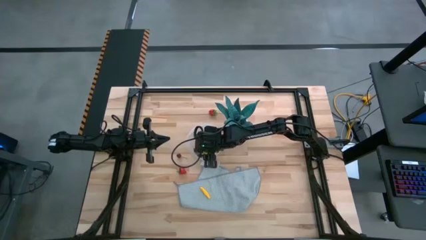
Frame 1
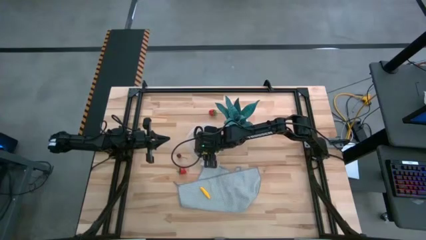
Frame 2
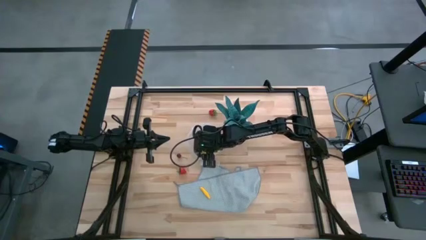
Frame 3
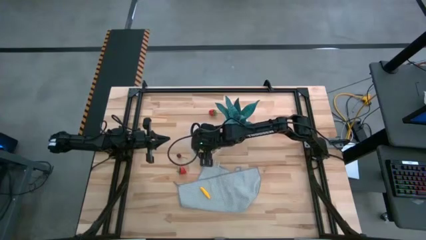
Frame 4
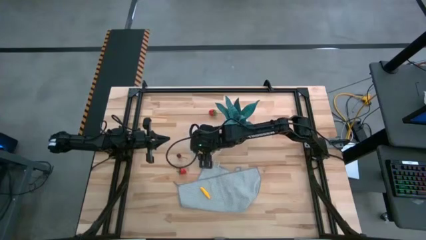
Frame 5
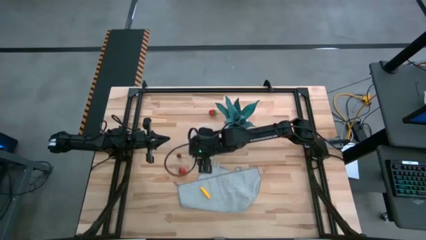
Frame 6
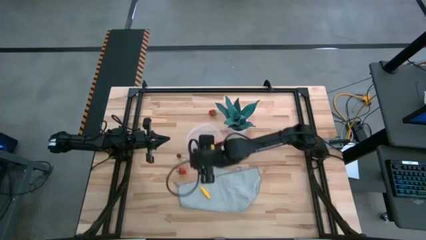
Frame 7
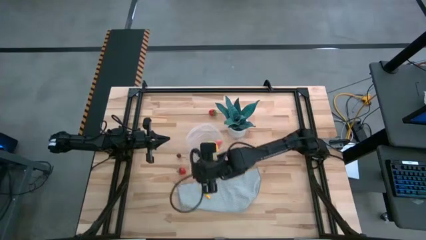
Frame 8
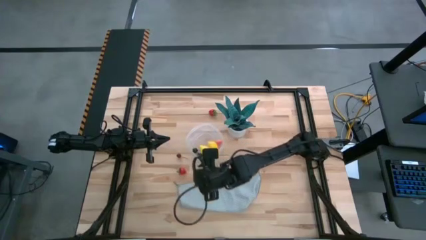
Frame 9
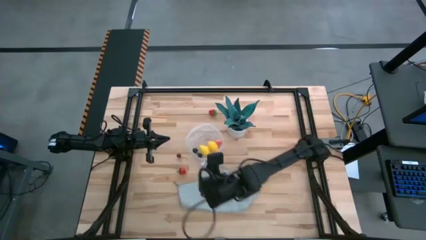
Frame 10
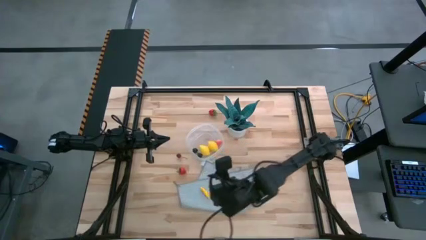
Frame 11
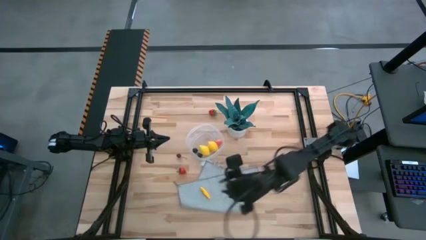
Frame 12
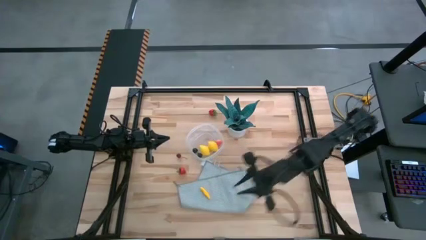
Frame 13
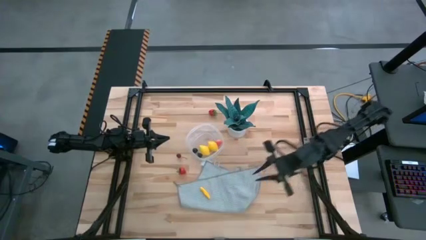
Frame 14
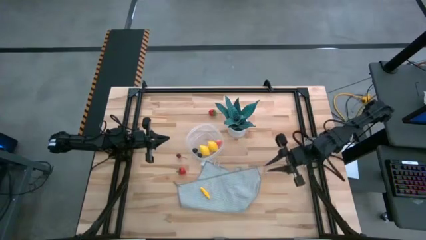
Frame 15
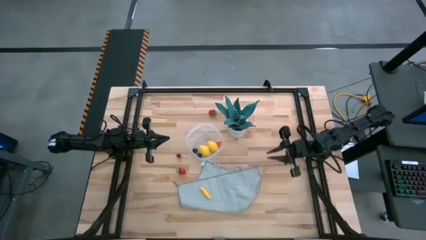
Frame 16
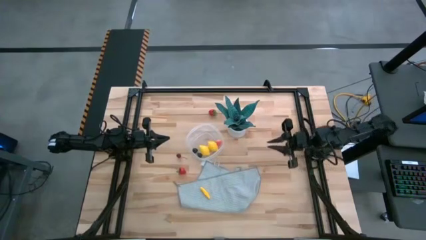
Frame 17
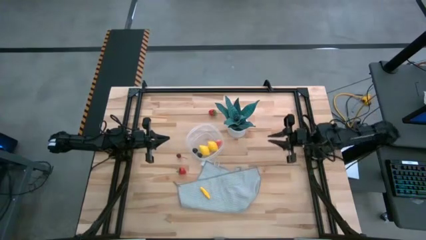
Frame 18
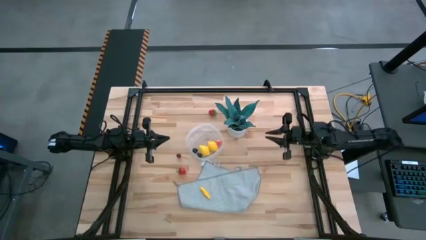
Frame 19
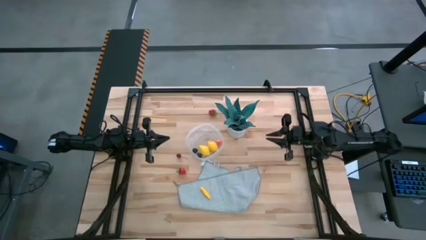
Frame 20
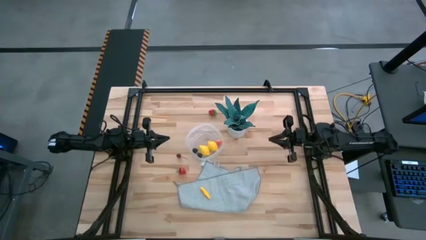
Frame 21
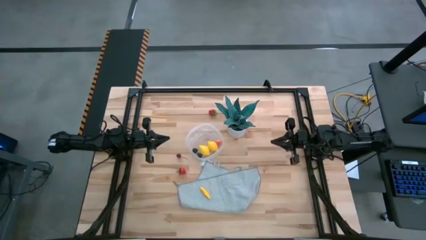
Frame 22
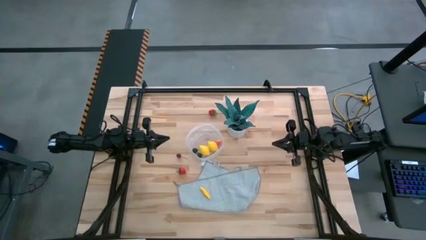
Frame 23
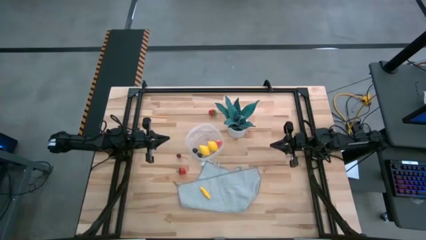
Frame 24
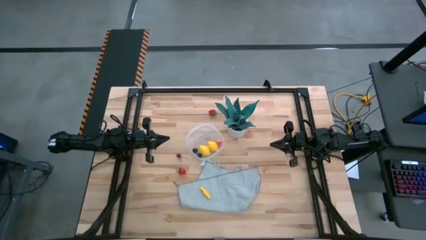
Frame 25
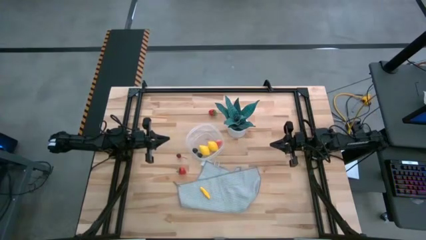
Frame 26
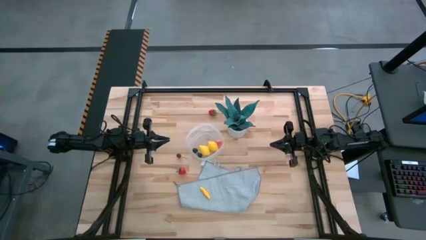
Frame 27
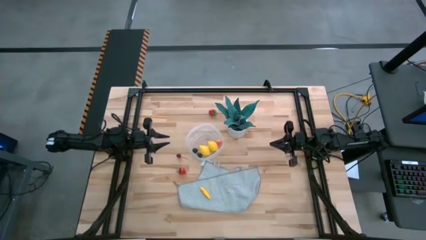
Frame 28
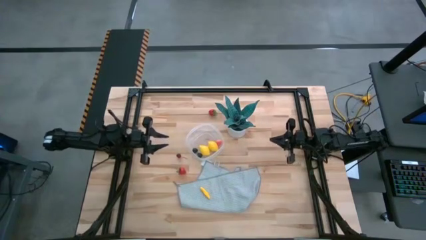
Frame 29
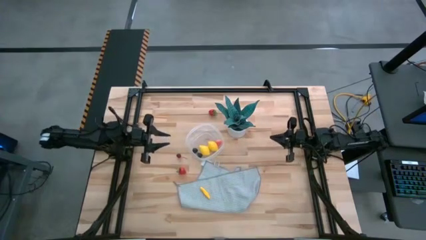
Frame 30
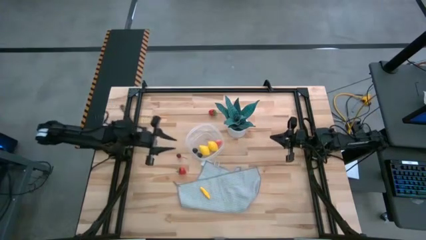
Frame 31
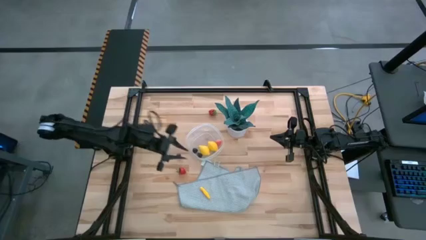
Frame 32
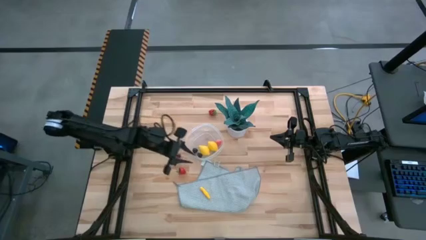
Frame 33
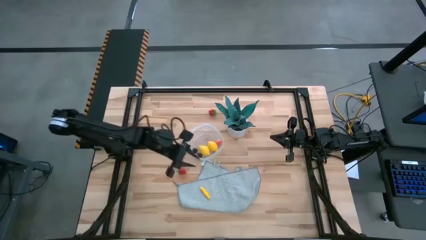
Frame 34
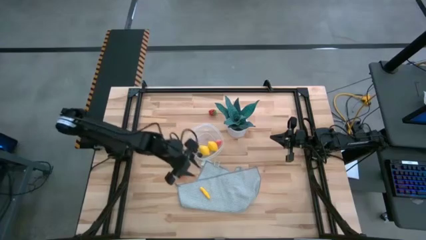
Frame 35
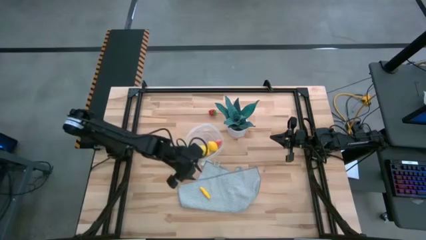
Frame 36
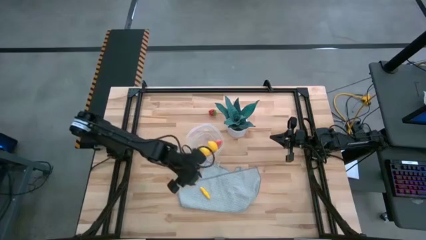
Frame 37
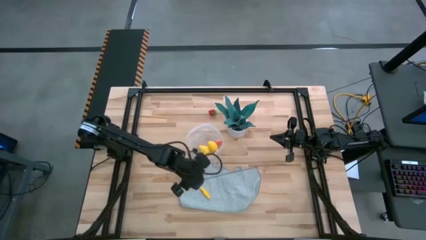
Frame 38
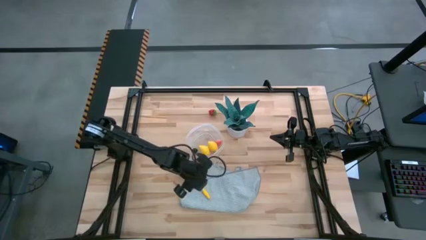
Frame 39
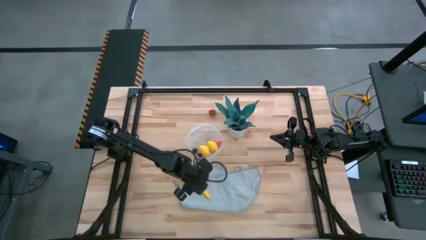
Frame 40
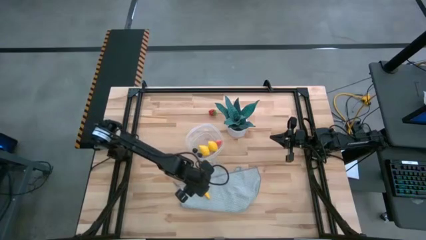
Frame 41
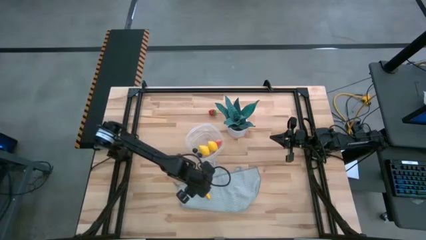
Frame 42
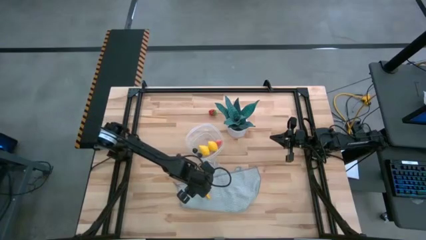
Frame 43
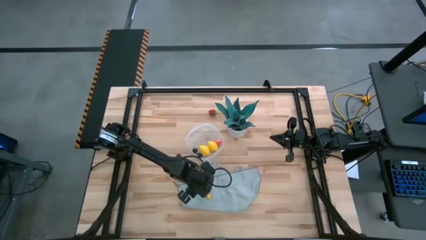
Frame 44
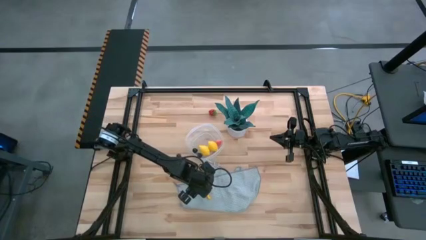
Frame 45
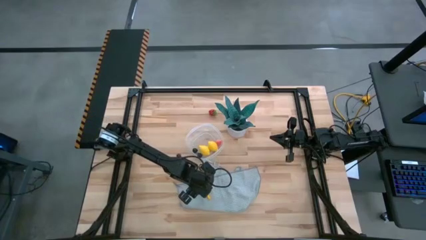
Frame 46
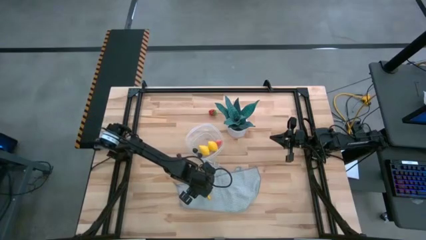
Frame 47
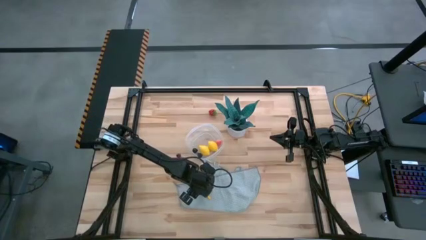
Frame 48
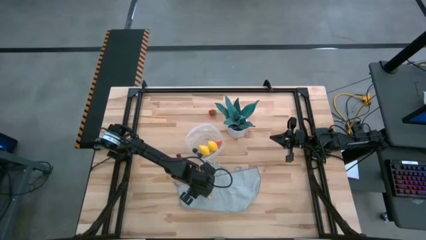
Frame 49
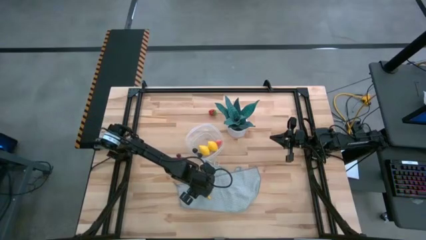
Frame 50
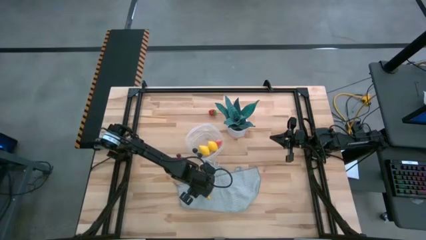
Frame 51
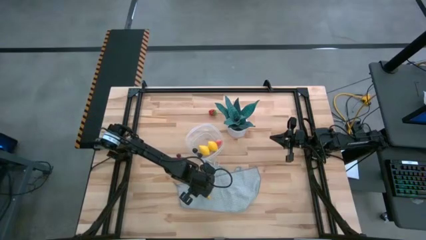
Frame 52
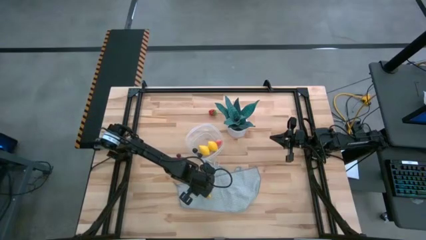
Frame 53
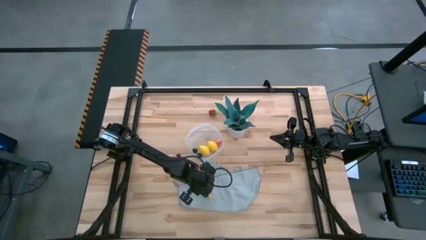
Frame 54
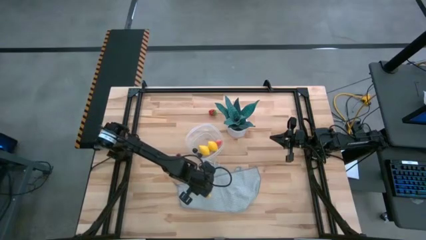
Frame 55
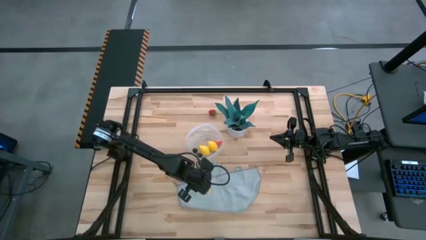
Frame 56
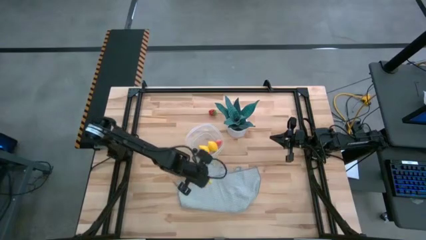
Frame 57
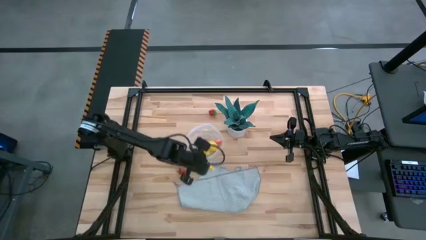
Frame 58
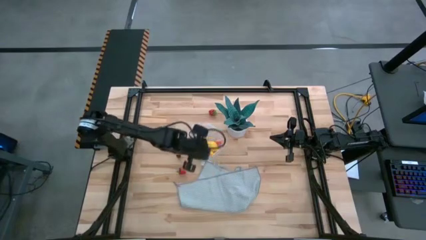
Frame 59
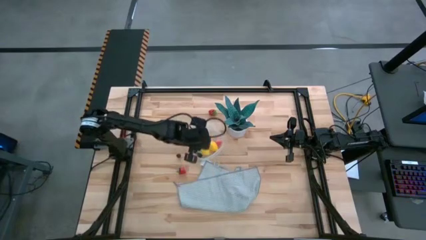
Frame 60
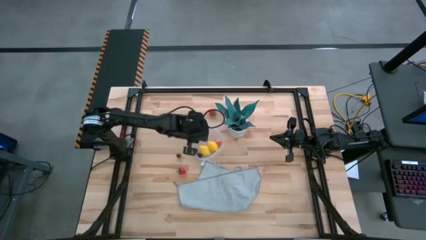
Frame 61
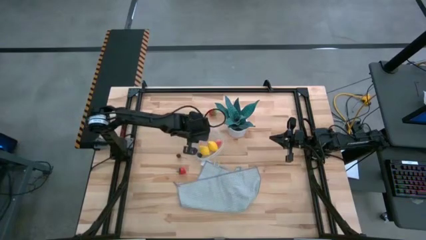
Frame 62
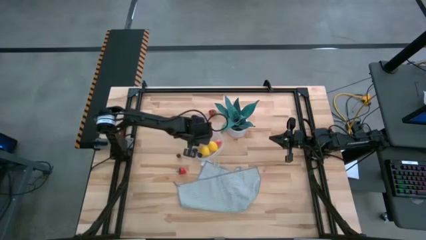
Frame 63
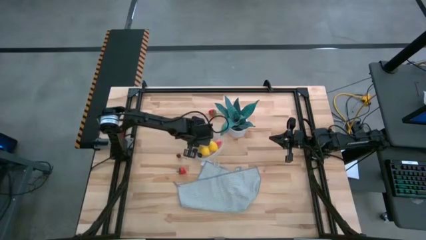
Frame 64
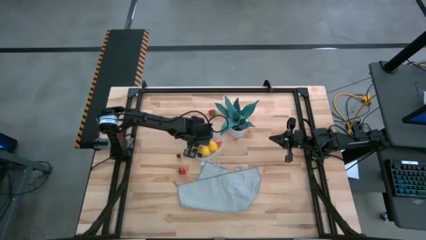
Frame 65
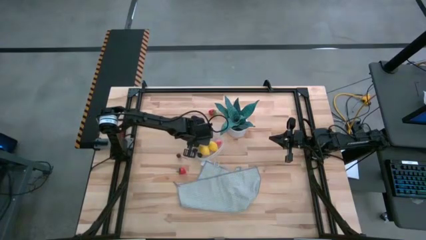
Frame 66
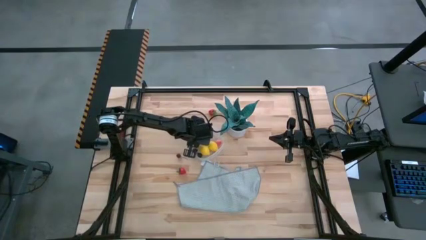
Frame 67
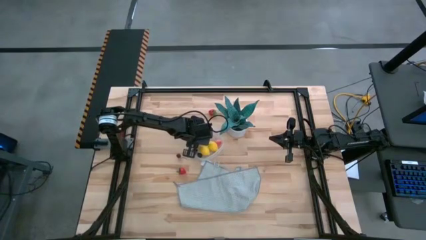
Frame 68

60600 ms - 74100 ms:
Task: Pick and placing Produce into tupperware
Put the yellow corn into the container
